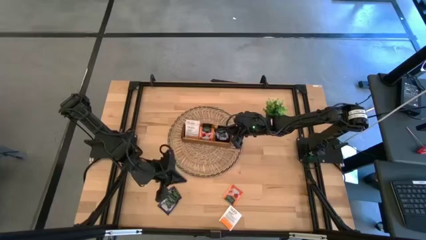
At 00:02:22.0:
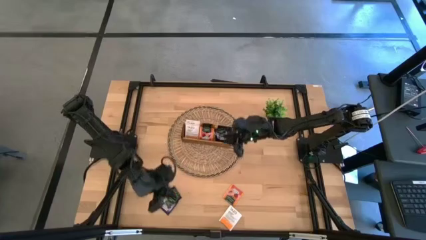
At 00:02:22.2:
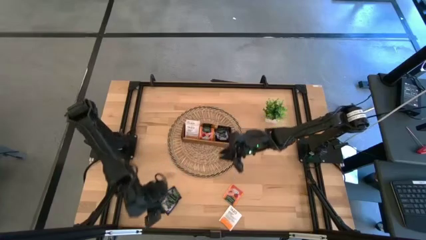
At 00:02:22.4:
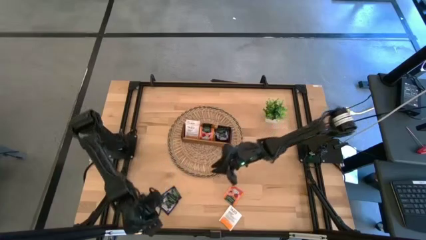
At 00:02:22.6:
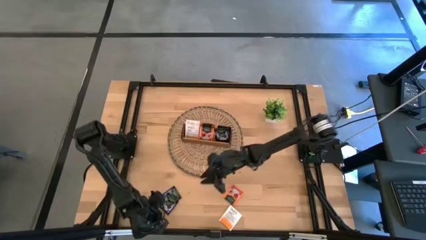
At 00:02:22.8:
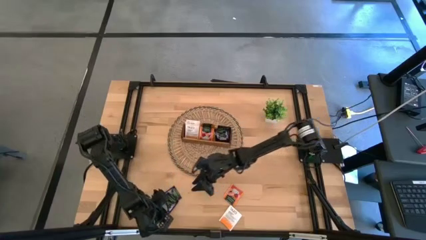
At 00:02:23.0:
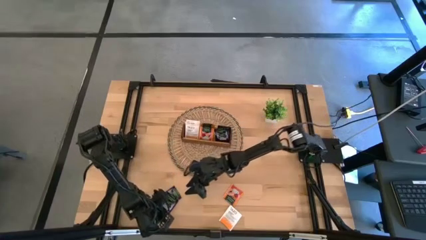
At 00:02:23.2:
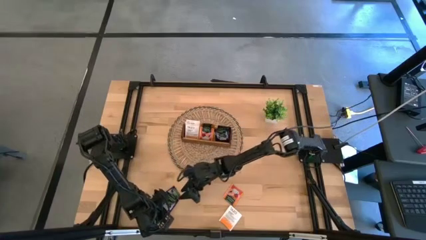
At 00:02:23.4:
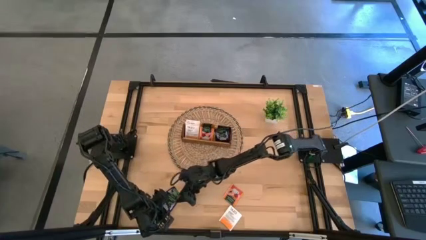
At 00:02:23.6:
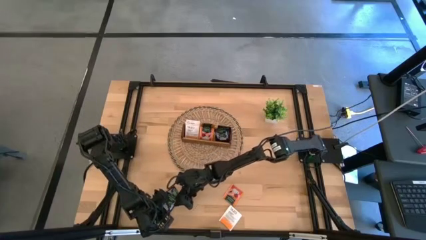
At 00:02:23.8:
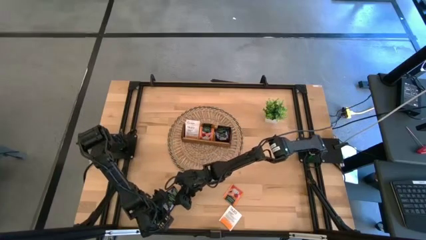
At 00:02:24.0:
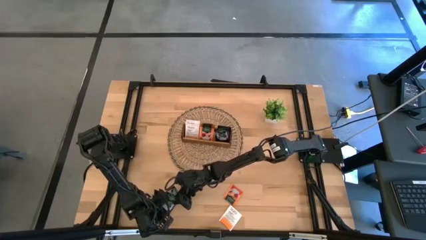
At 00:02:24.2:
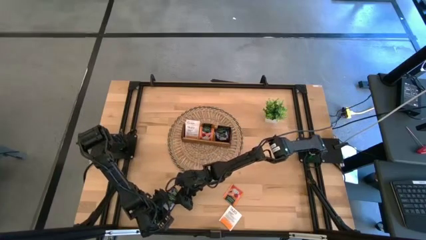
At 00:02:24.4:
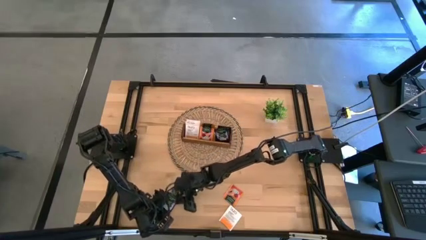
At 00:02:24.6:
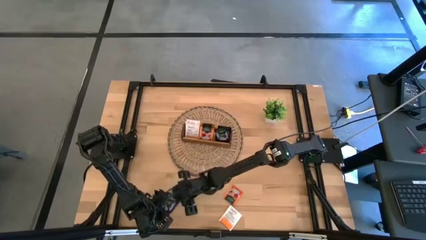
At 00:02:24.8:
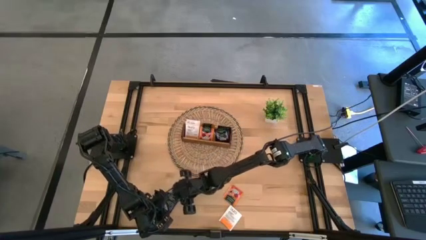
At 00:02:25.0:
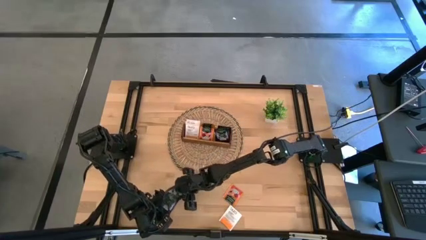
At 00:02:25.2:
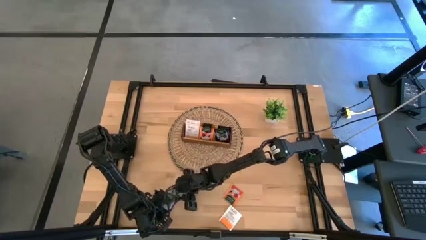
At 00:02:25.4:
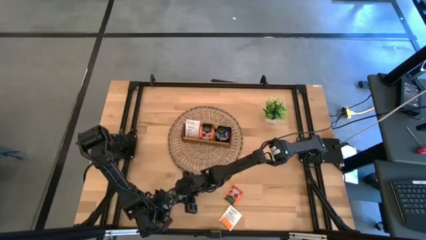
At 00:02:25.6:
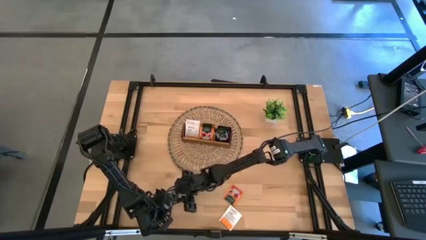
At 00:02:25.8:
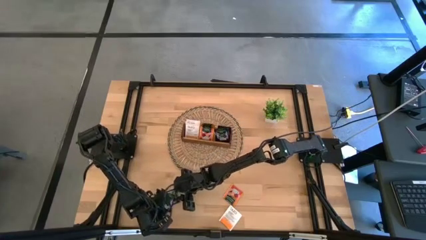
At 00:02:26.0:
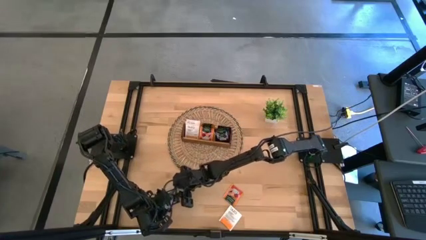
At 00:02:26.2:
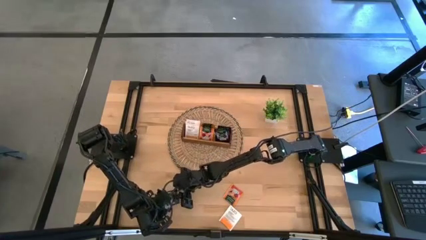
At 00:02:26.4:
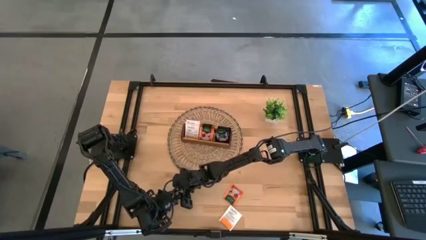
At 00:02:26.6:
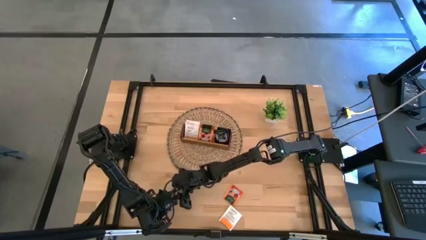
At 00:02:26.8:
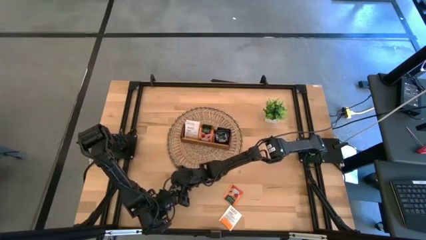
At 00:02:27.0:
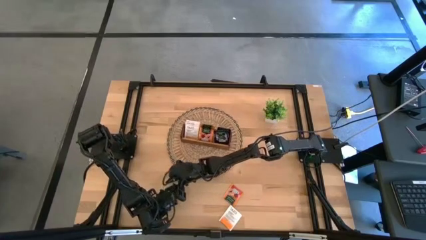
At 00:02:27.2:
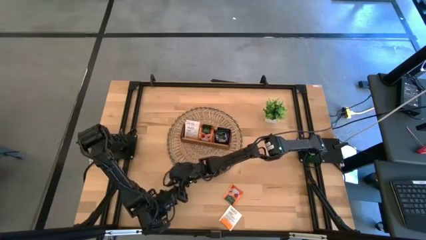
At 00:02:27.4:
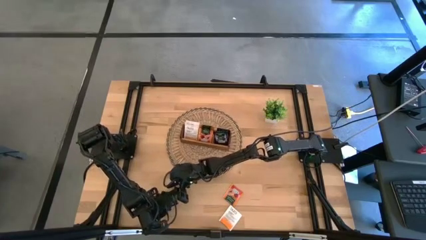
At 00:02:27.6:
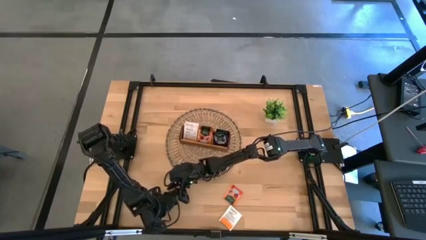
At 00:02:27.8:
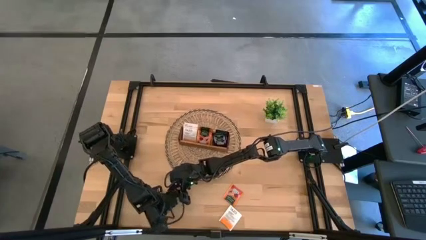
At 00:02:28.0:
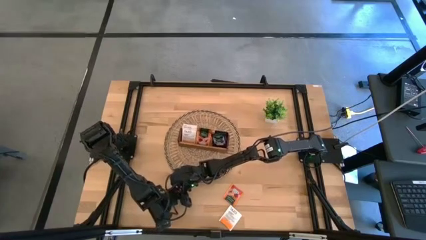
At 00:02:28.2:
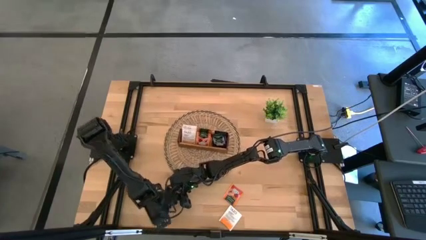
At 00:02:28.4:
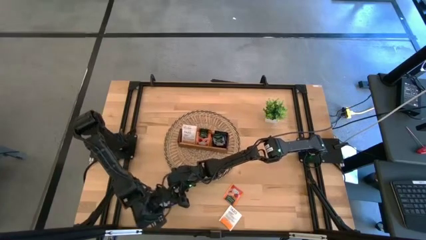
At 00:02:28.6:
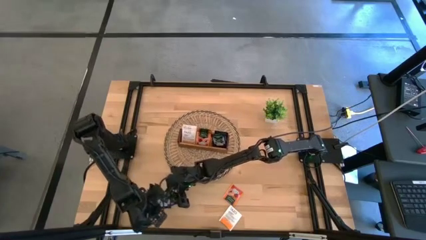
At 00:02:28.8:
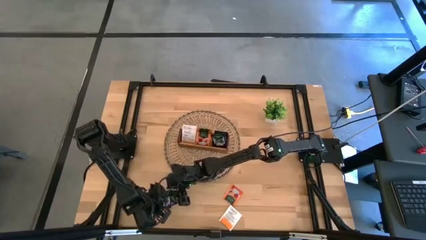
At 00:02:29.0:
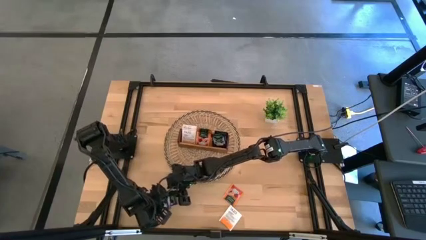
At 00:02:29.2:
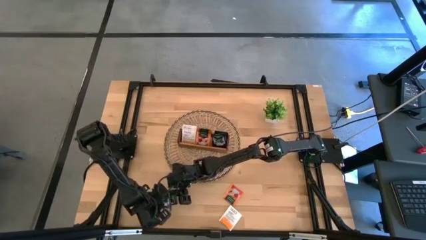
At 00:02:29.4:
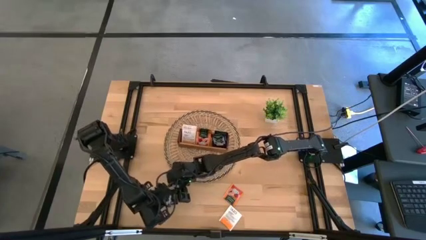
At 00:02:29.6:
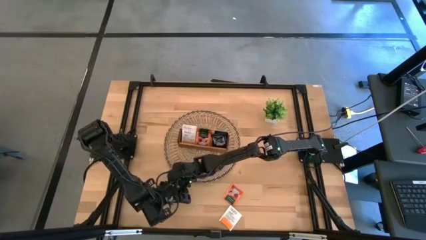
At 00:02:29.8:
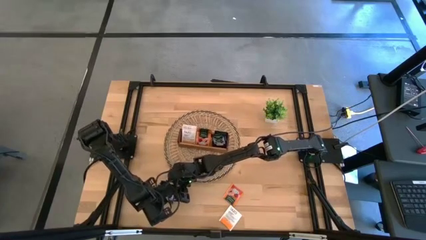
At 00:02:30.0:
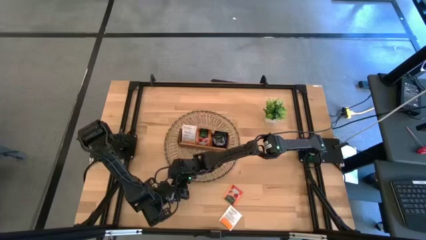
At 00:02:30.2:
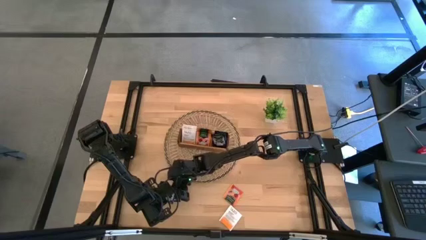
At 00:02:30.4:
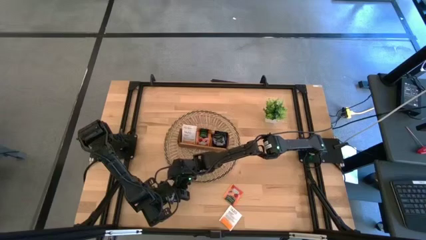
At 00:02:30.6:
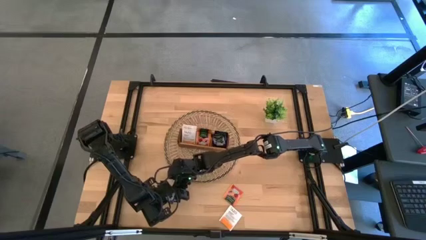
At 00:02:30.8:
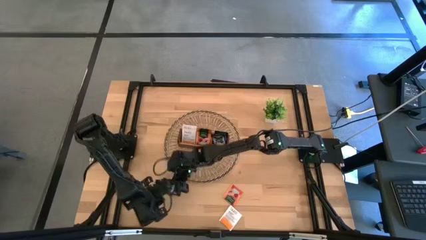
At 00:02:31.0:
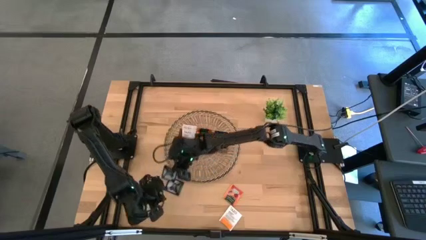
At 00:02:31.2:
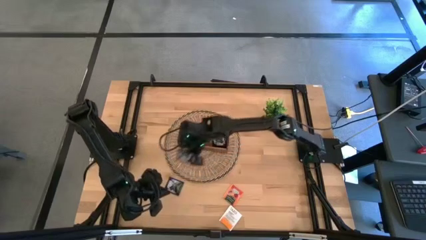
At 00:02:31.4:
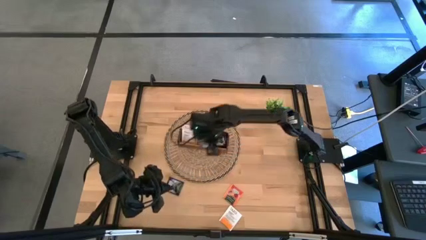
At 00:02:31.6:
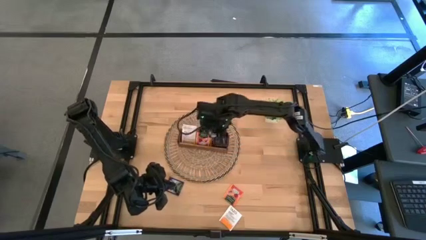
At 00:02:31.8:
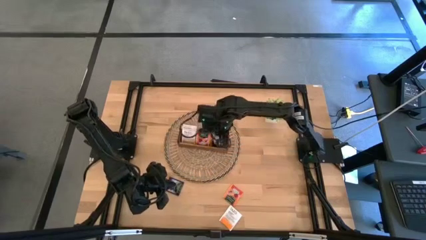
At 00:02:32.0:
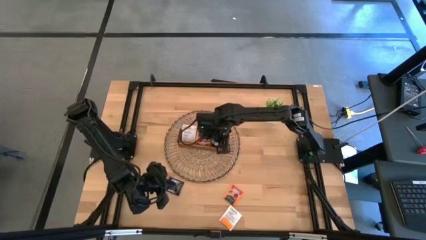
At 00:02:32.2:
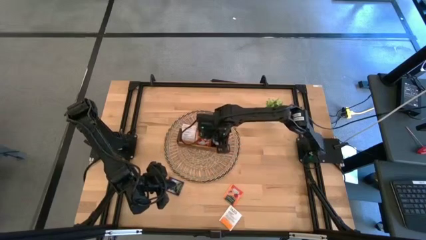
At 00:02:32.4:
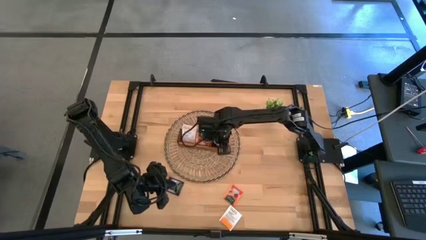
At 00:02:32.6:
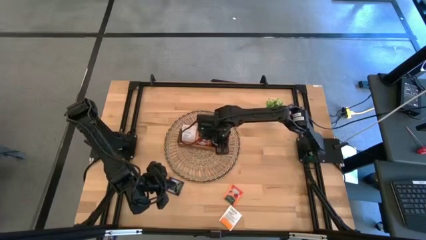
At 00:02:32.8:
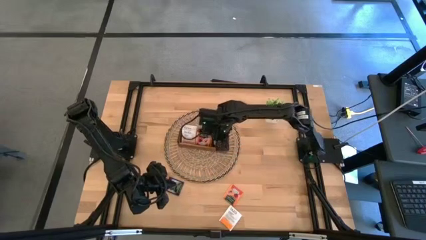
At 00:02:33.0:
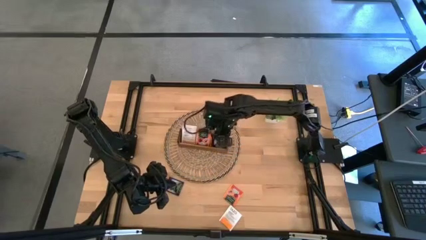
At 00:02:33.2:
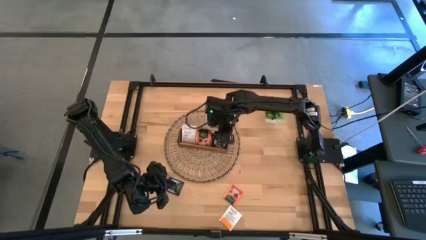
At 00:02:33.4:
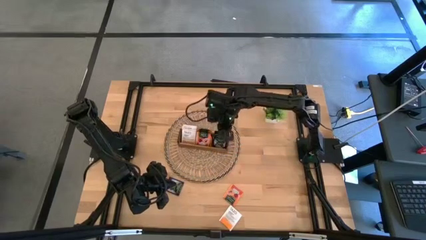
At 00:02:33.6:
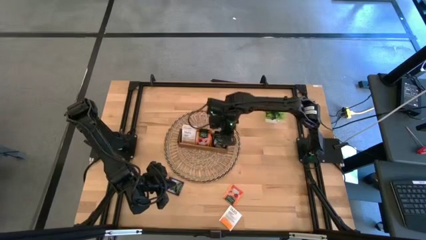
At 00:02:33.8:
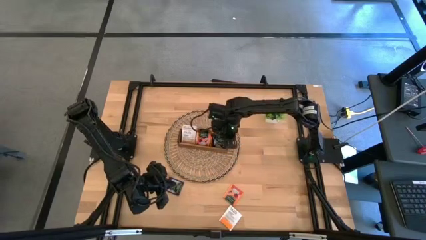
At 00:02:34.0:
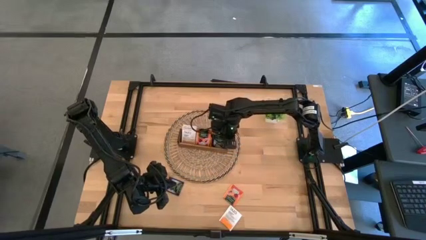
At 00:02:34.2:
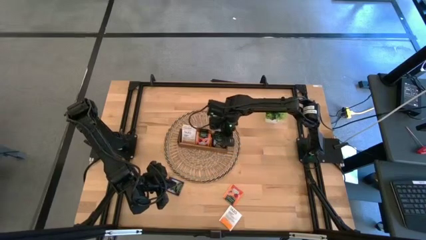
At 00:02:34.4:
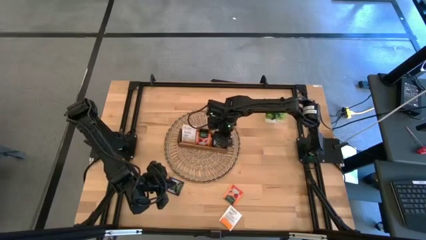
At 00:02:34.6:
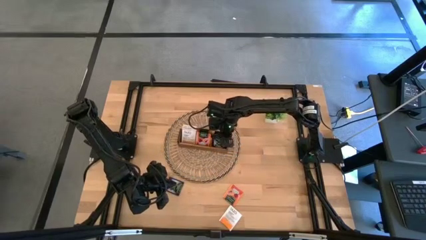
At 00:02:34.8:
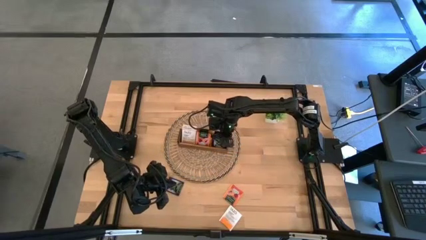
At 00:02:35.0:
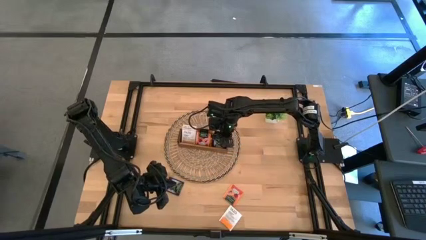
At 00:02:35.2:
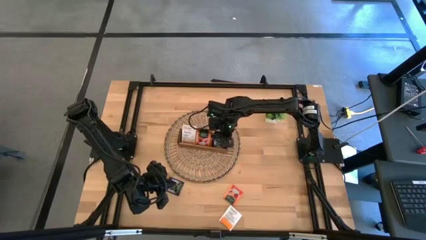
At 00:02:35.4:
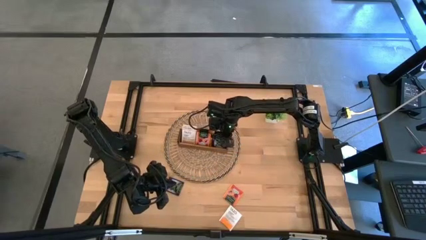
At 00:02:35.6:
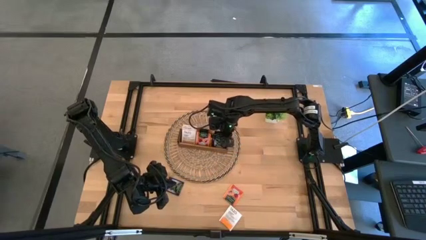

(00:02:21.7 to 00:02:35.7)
Task: Pick & Place Tea
Put the purple tea bag into the right section of the wooden organizer
